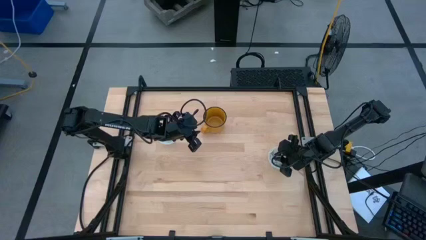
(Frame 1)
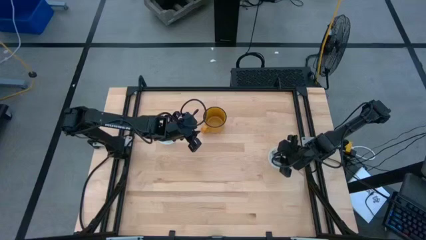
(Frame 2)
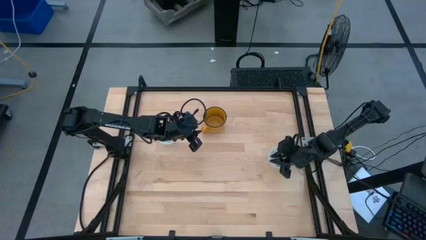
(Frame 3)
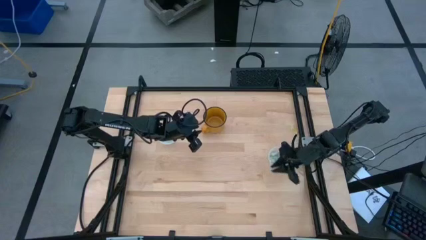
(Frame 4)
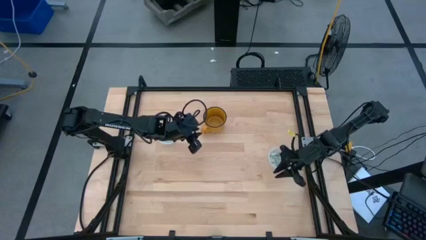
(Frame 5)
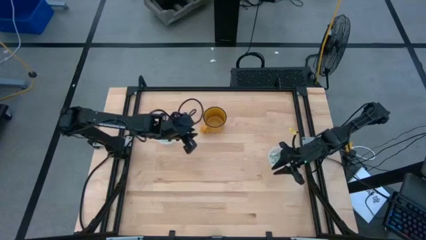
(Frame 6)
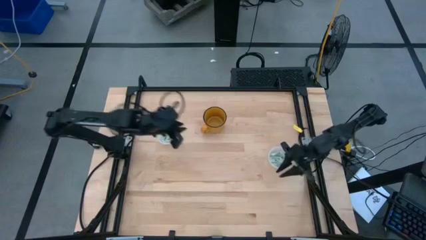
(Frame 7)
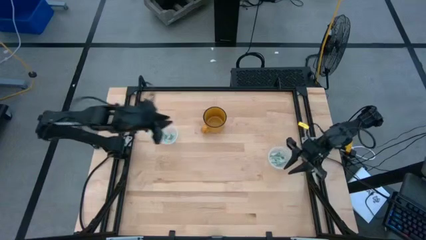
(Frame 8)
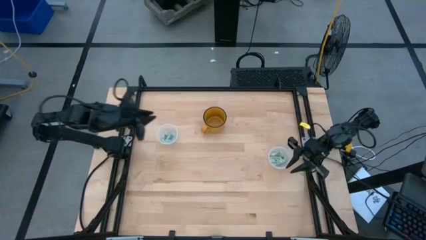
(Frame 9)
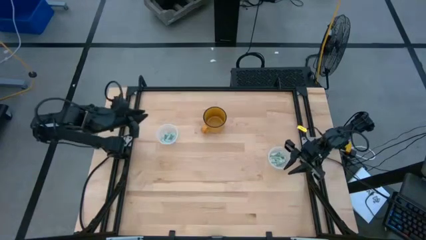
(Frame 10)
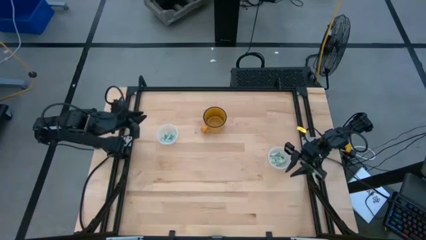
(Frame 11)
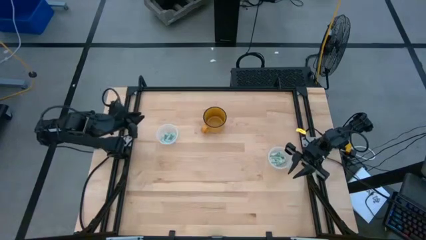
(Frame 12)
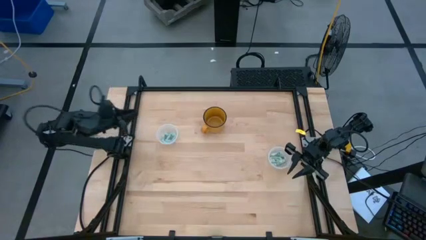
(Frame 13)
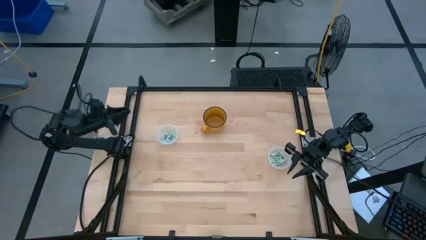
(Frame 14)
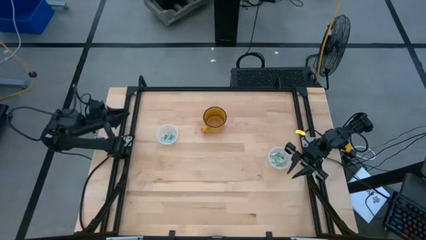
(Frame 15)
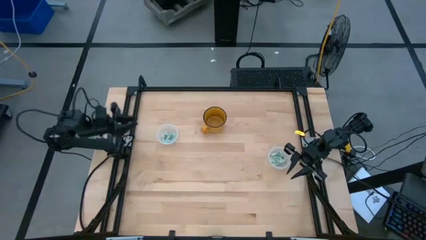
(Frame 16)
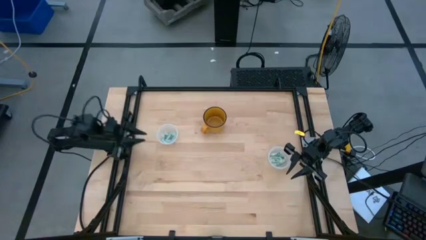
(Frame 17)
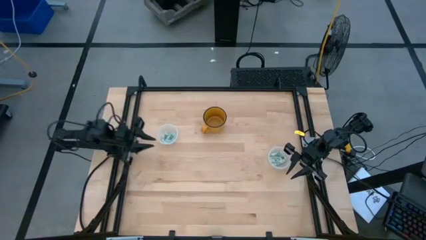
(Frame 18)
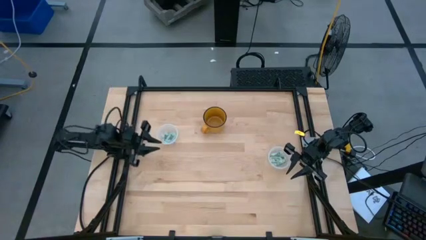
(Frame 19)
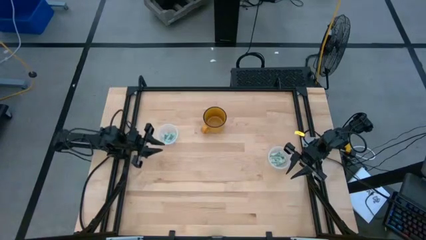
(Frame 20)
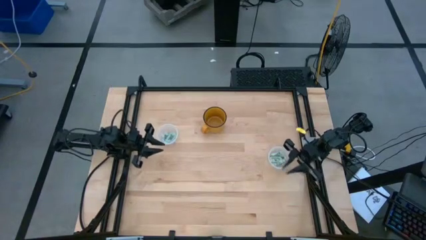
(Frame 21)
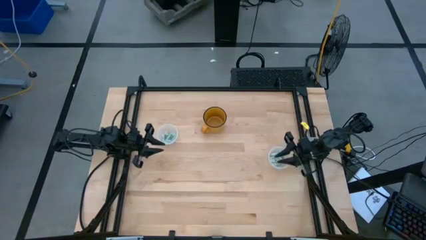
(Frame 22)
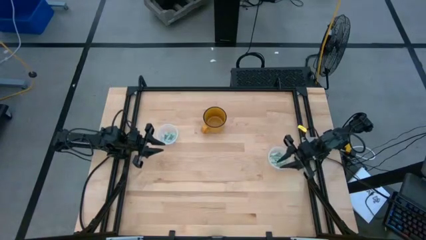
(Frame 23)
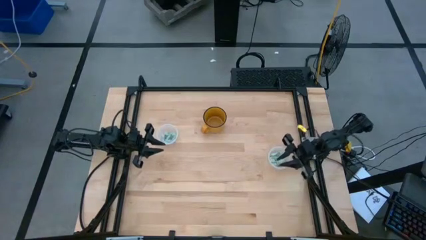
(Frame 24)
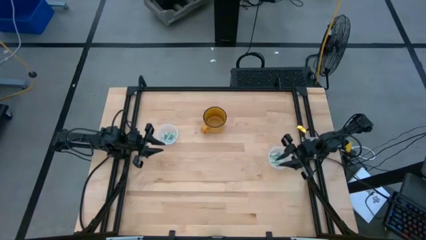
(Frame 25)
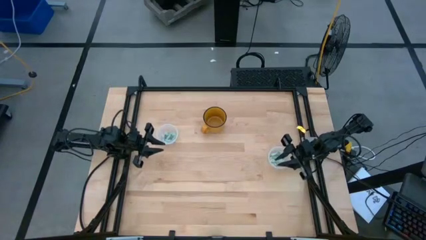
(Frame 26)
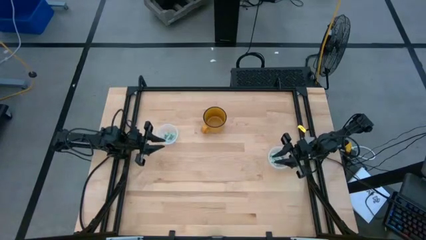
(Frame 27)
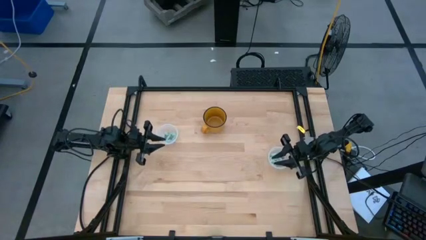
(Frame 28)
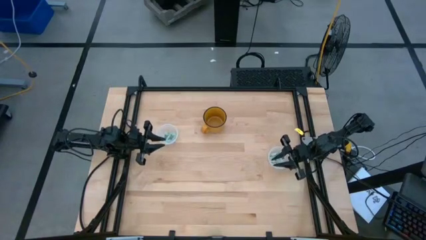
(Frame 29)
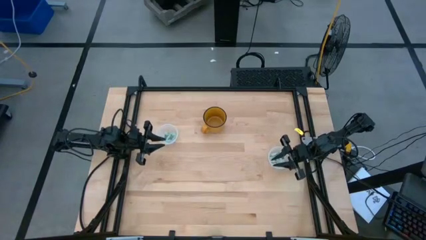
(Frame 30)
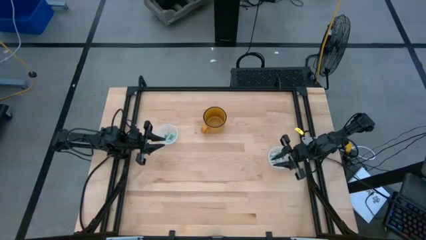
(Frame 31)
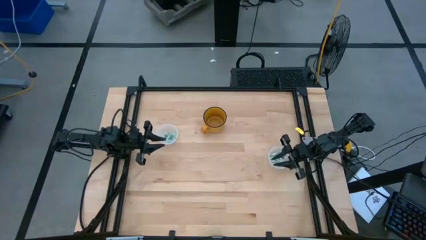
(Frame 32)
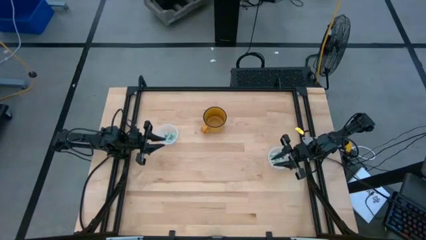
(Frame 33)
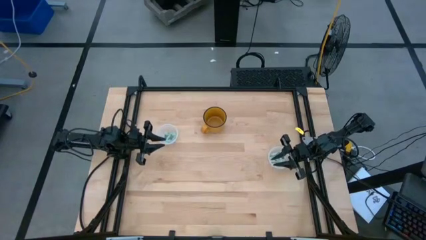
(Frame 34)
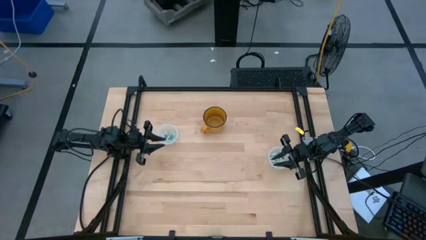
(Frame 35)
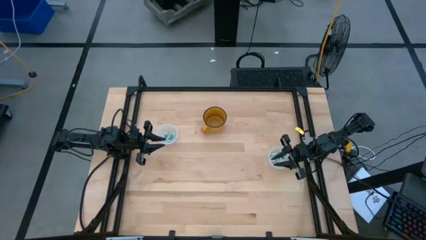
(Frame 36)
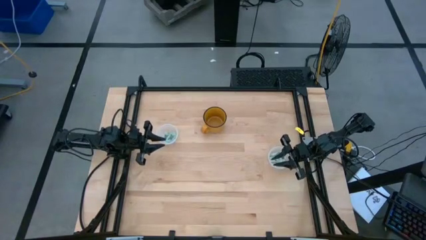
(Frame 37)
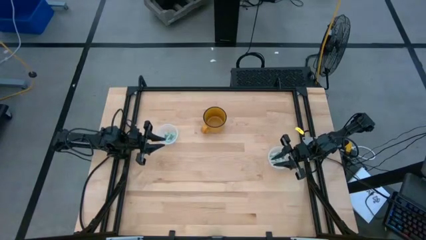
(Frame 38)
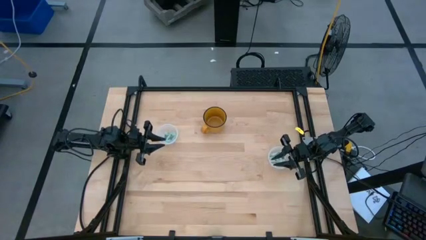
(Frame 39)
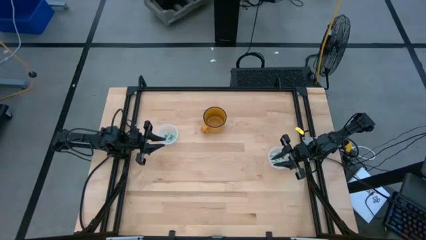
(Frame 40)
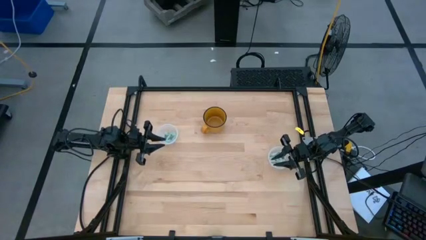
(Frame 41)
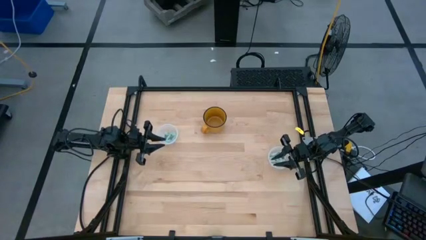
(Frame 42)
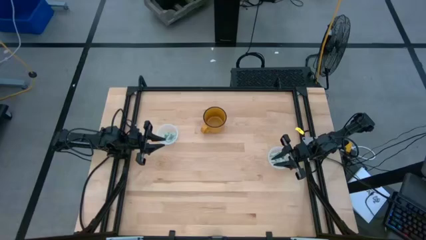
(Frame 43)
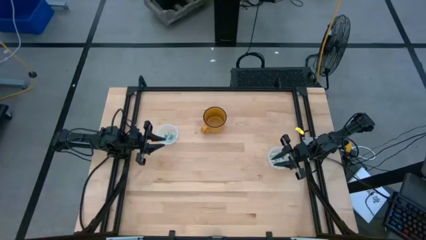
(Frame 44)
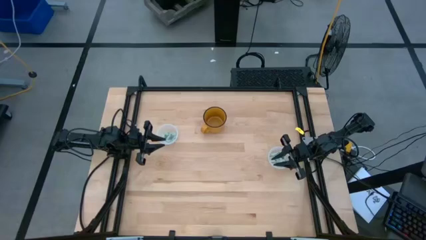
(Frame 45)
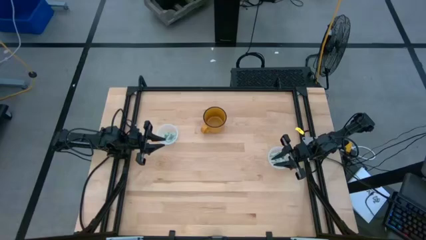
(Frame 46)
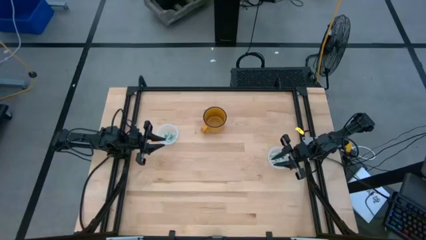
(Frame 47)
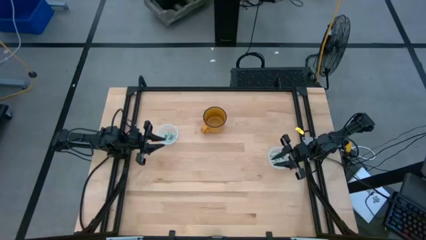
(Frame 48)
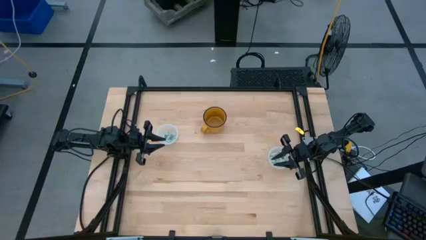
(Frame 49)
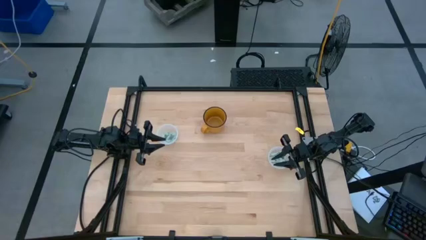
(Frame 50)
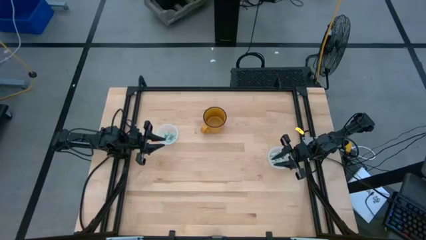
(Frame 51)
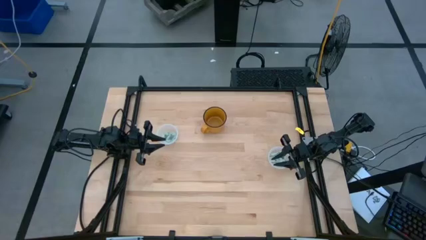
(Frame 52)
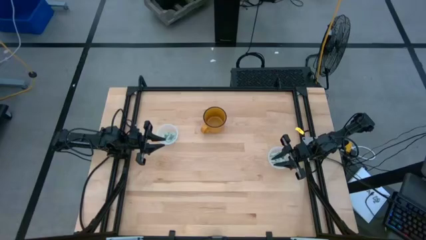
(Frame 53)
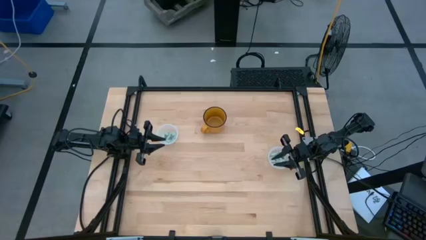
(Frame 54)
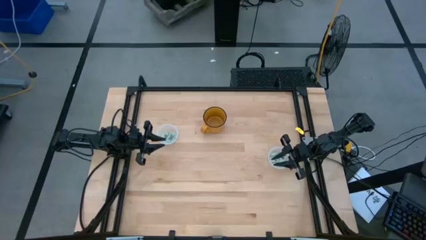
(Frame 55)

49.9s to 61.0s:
Task: Pick and place Stevia / Truvia into bins
Return to Home Position

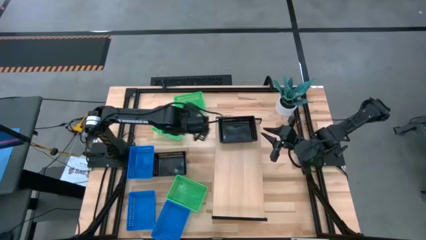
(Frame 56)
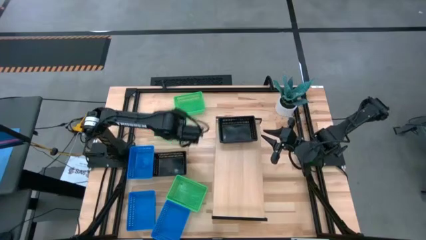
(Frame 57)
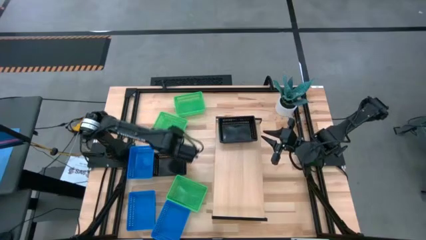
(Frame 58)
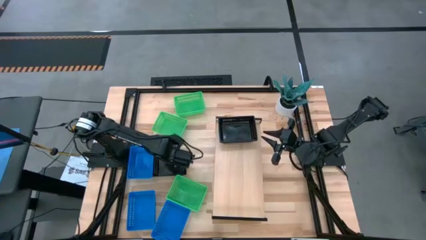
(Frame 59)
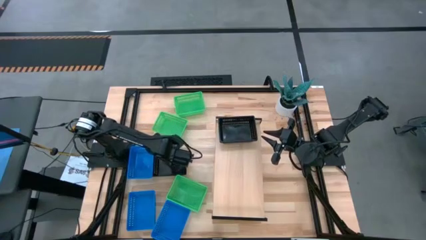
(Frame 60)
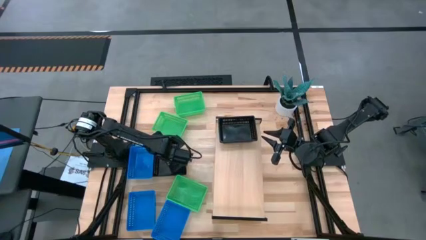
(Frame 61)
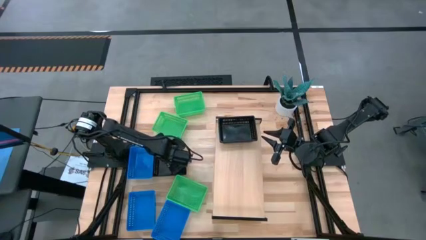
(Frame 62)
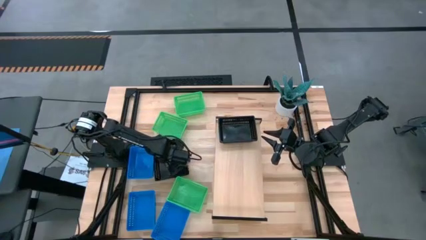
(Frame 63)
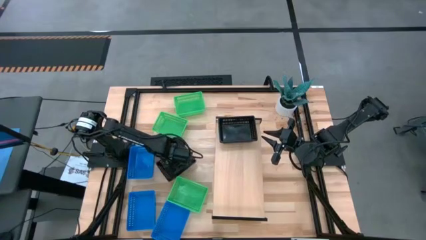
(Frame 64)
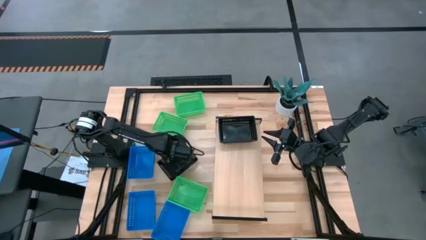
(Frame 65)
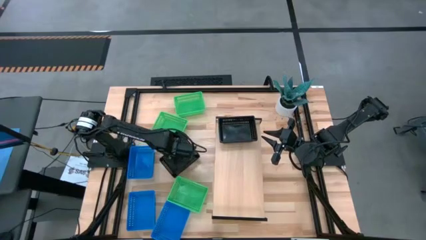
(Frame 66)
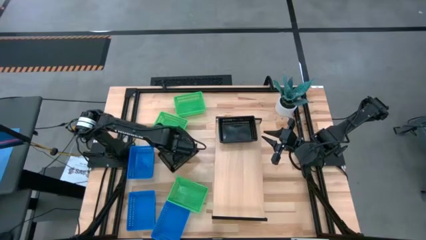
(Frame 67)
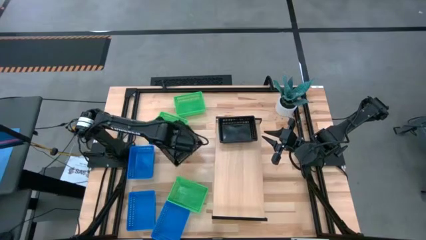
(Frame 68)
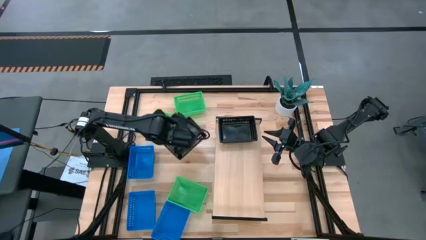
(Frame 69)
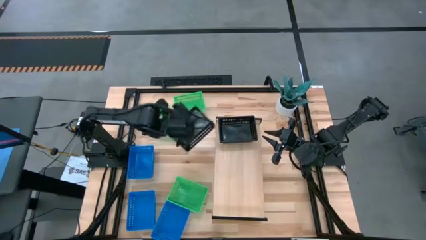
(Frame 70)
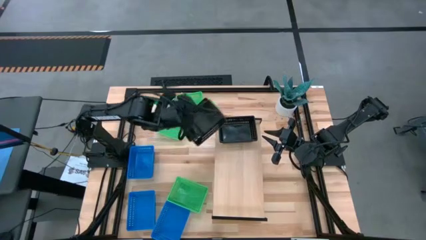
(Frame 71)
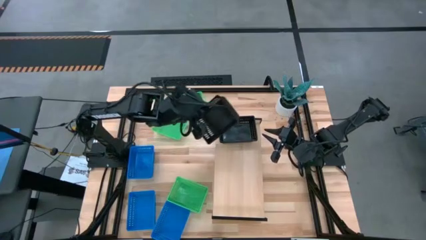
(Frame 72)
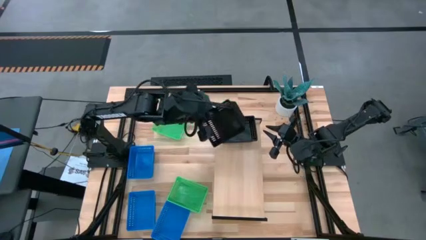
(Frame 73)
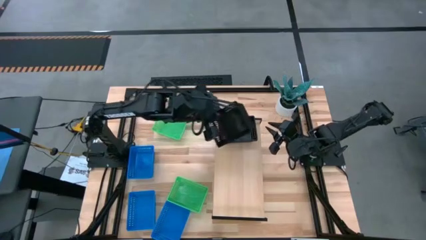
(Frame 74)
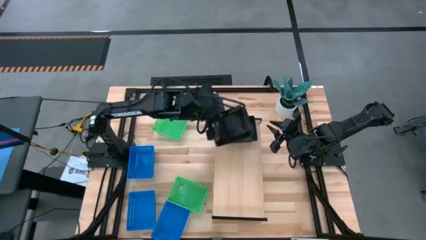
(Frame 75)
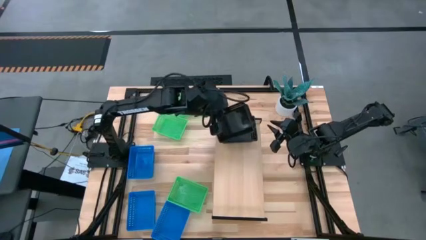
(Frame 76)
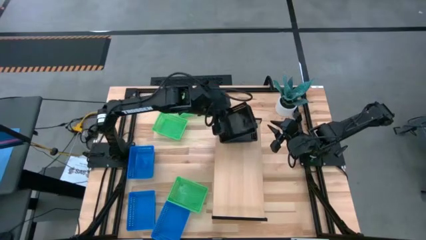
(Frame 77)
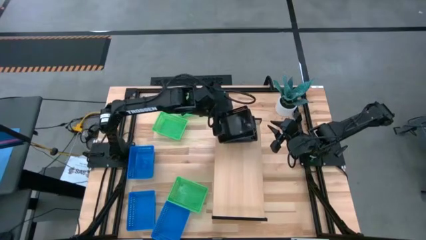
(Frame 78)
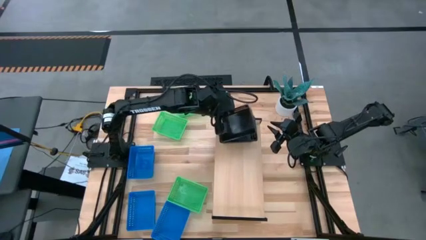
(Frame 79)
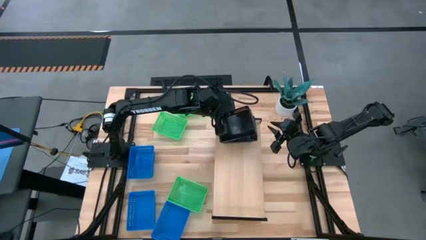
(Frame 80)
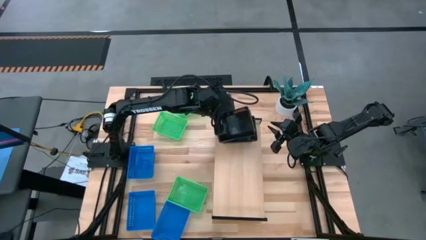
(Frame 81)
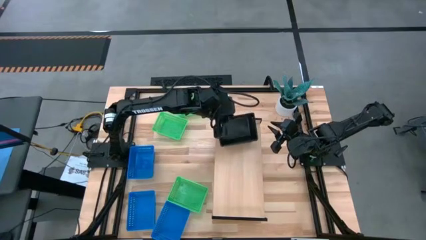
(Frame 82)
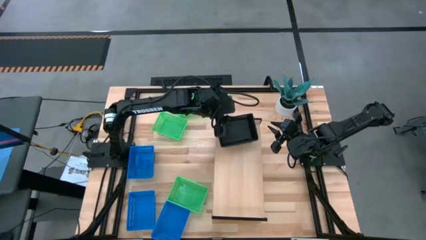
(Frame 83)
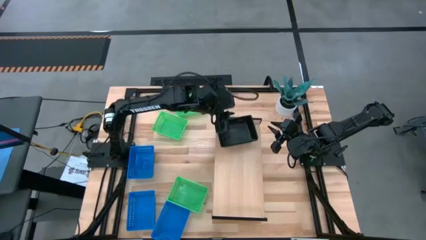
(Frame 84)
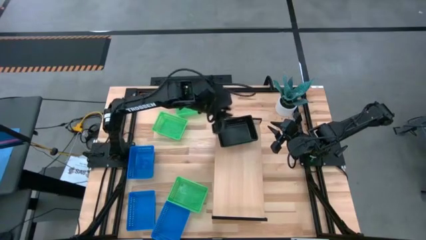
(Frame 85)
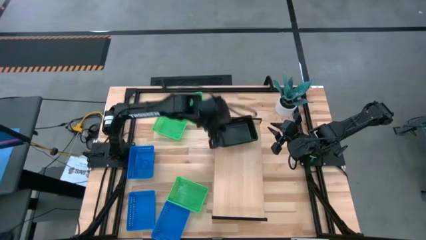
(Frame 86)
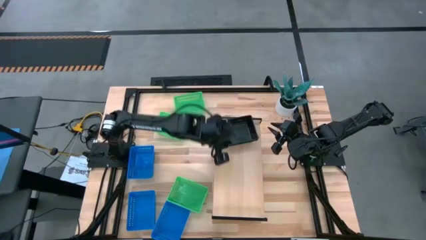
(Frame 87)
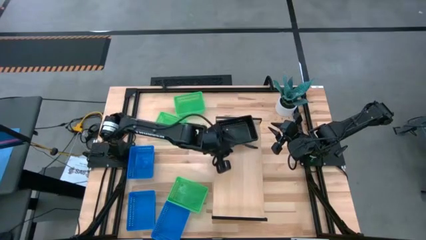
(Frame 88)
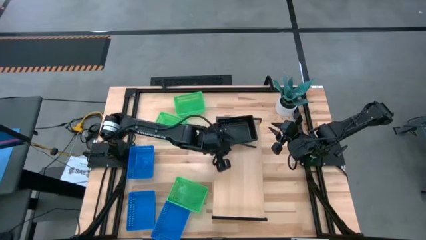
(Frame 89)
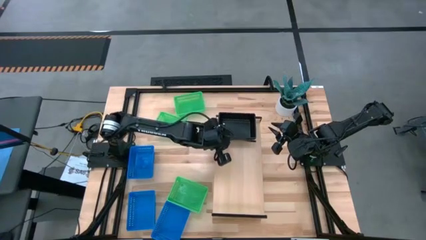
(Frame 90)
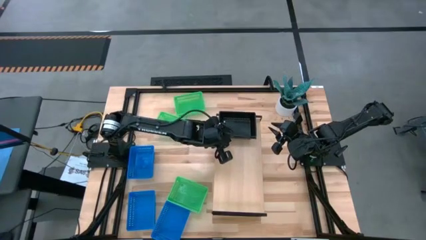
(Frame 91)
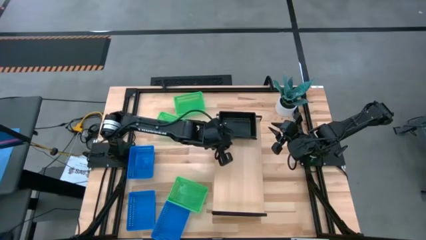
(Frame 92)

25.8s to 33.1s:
Task: Stack baskets on shelf by color
Stack the black bin into the stacked black bin on the shelf
